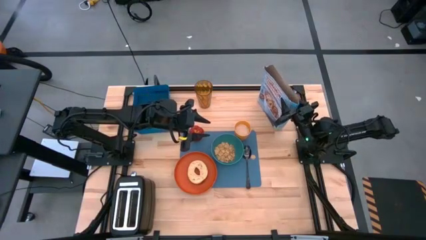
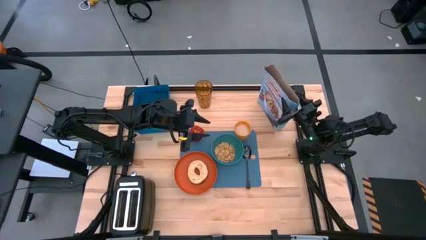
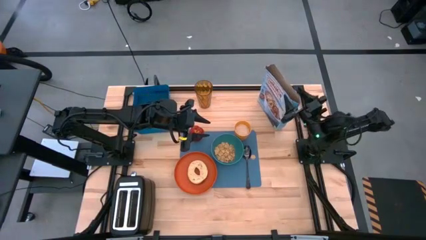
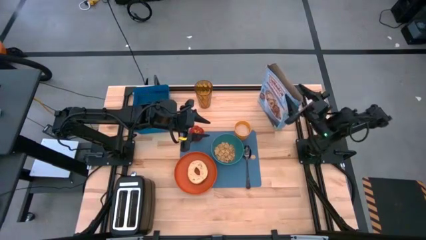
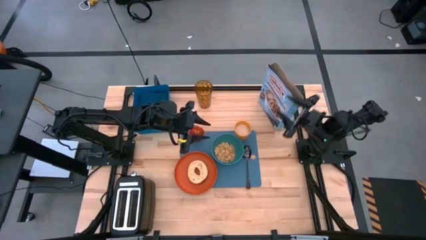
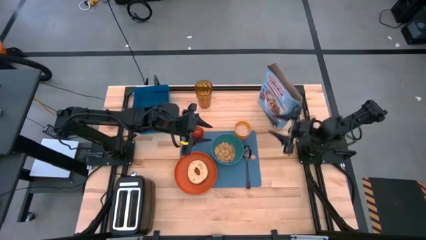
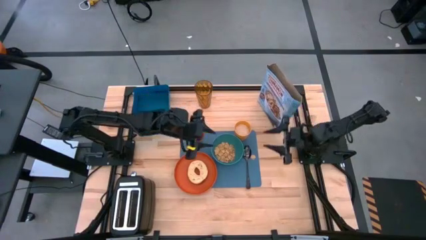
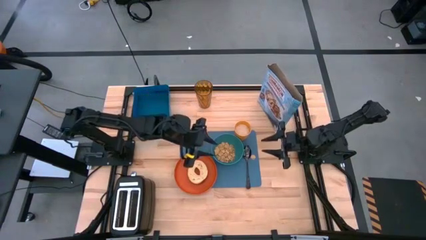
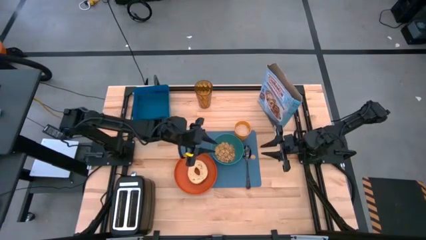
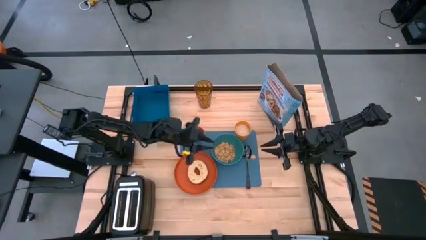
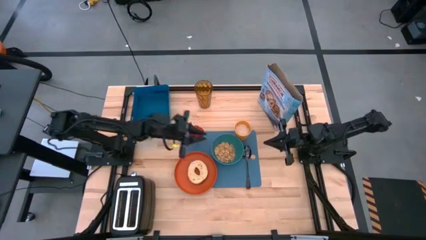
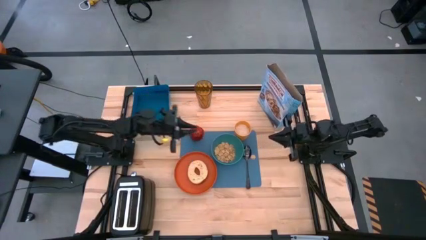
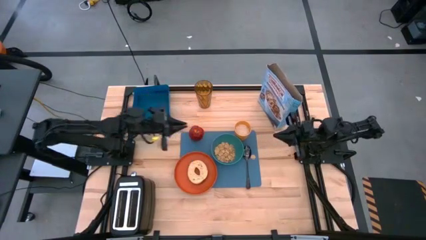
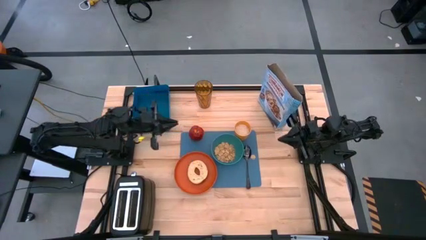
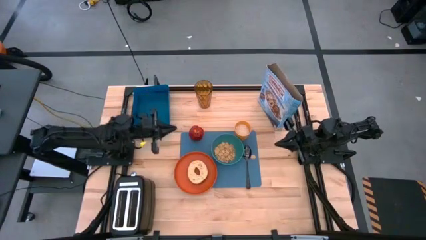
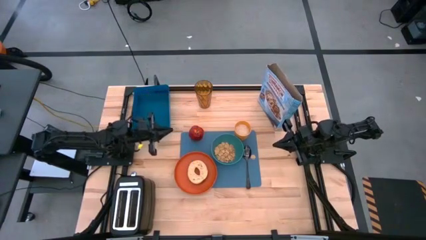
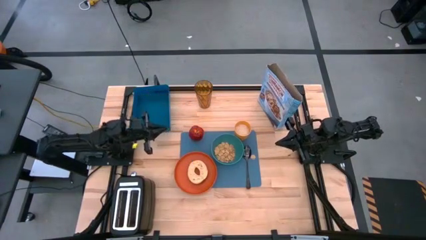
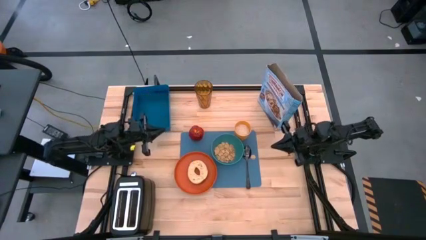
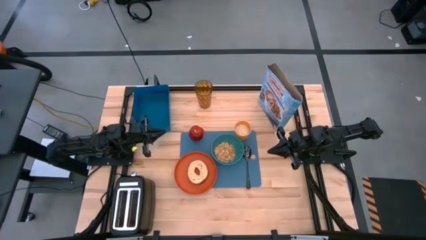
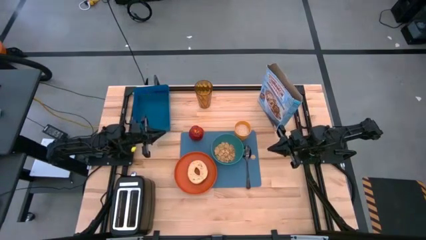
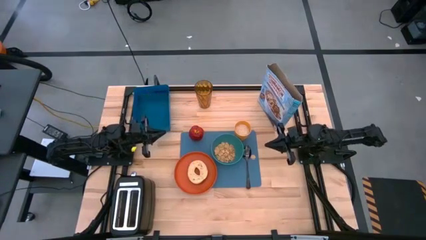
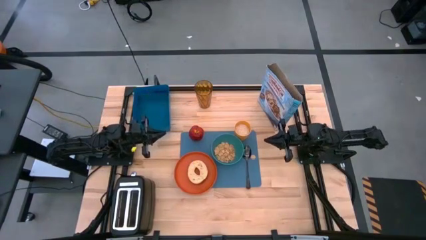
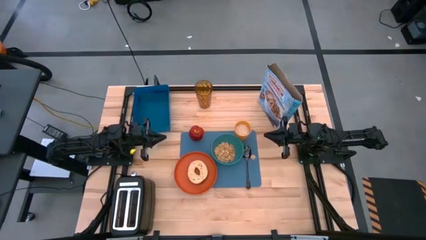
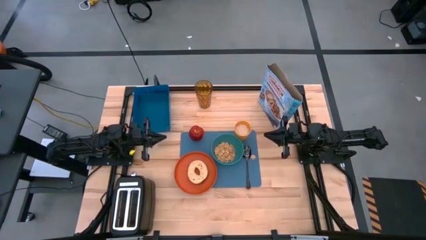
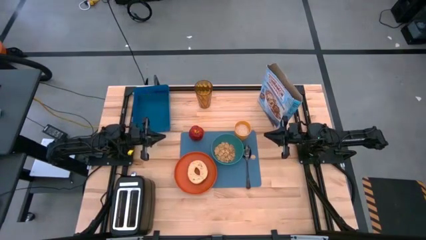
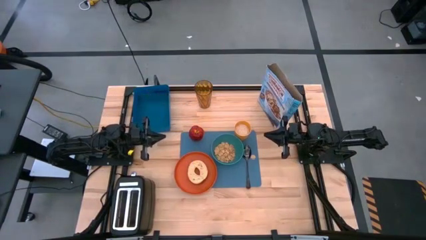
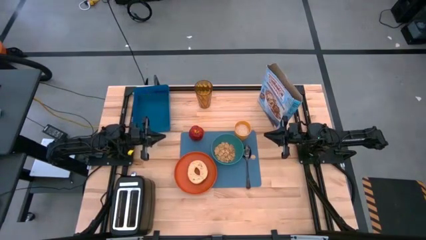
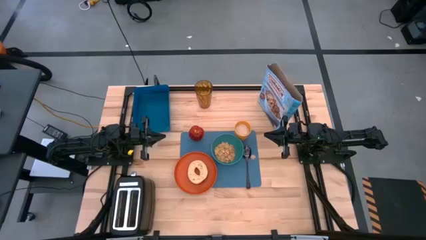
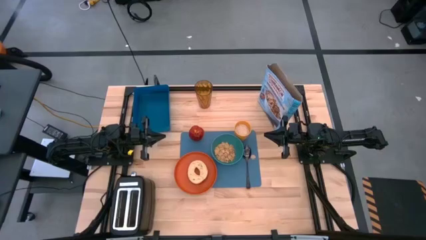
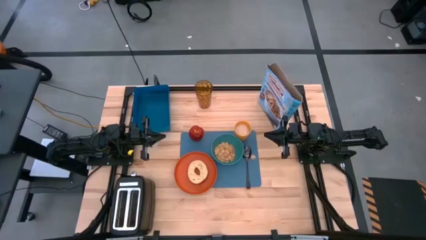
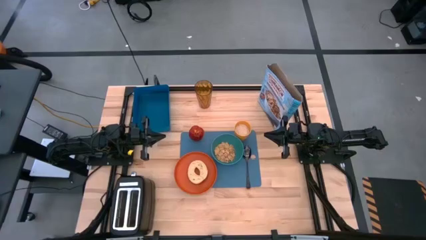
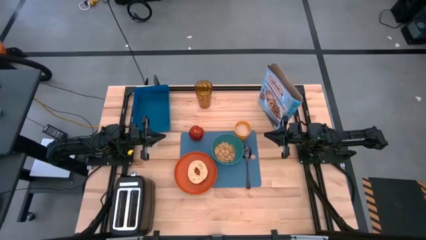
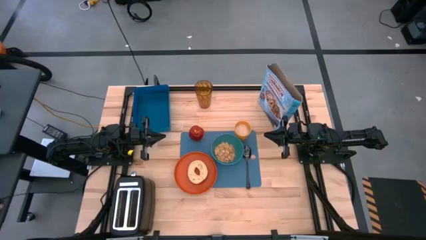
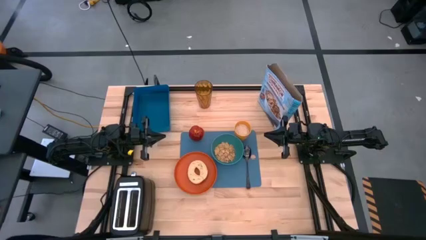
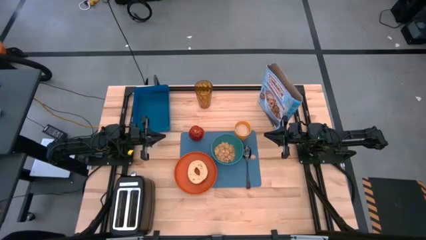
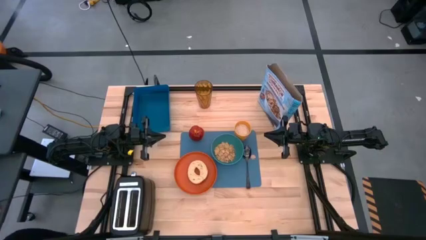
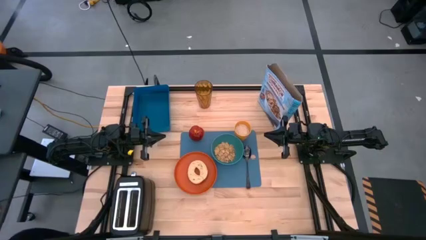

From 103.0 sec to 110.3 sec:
Task: Arrange a breakfast setting
Return to Home Position

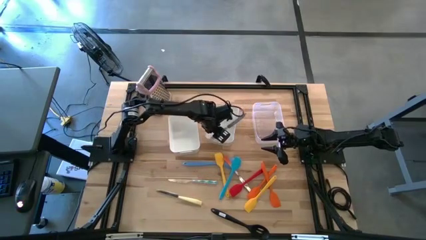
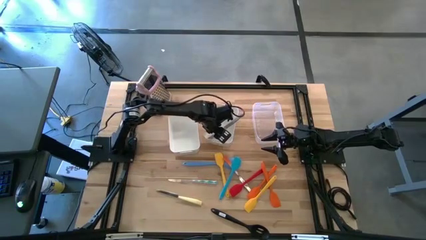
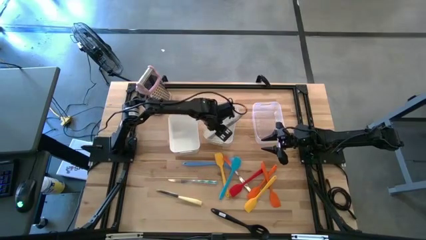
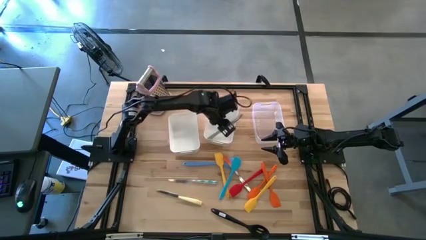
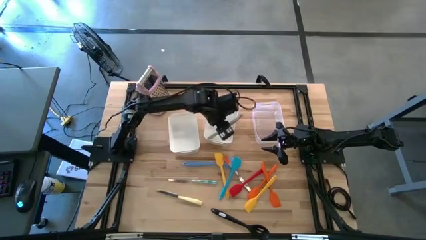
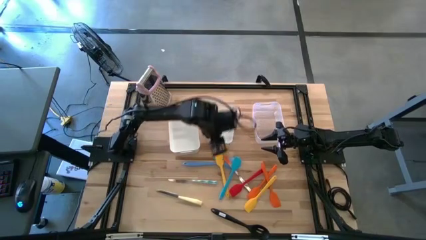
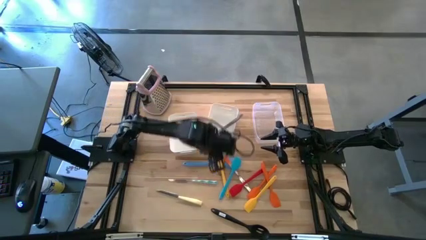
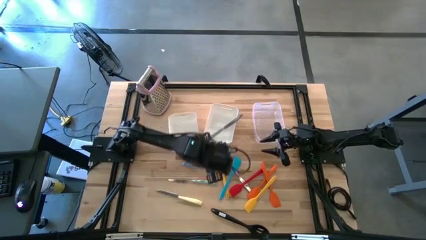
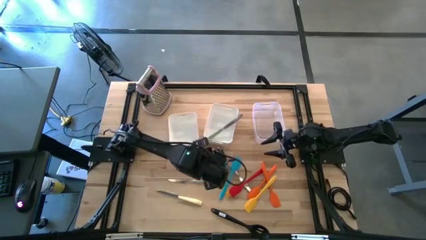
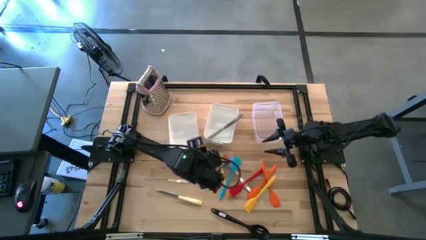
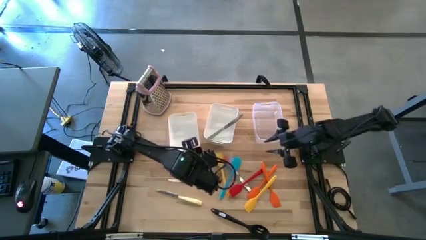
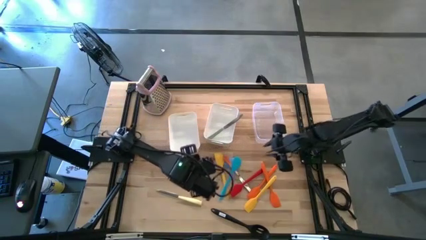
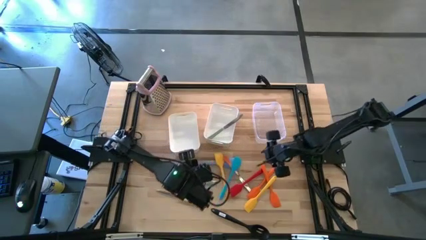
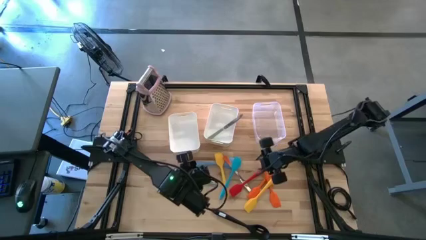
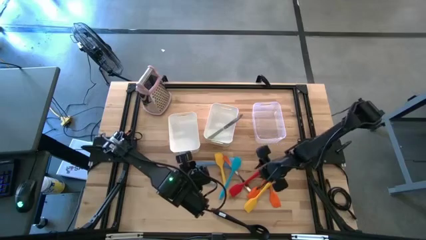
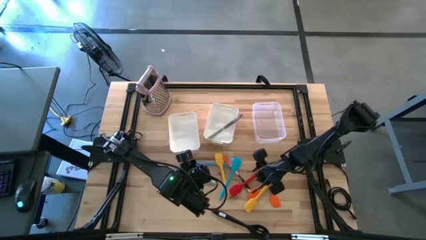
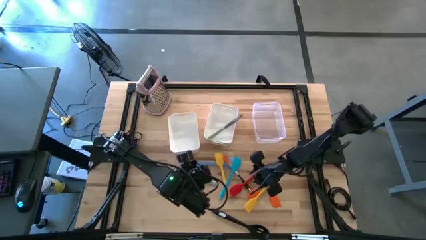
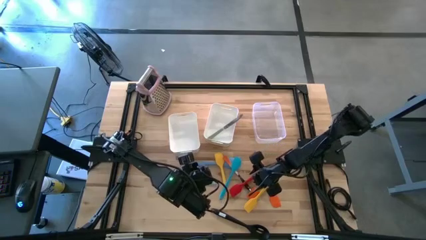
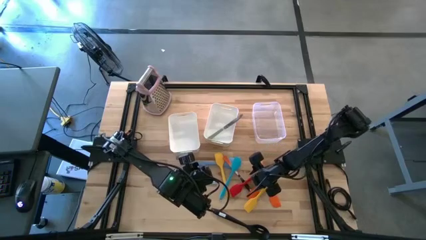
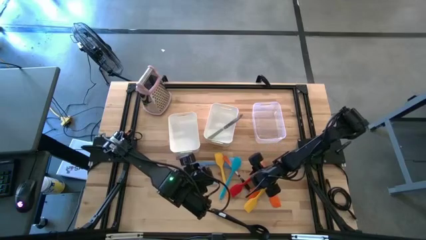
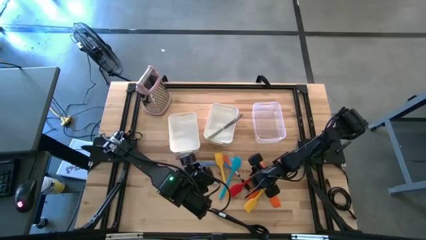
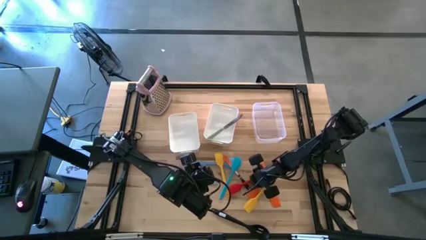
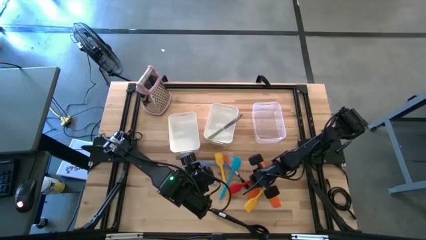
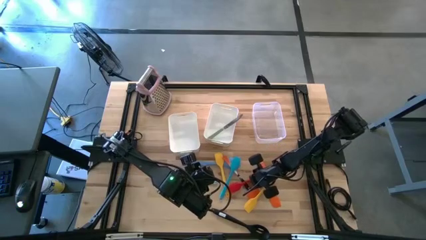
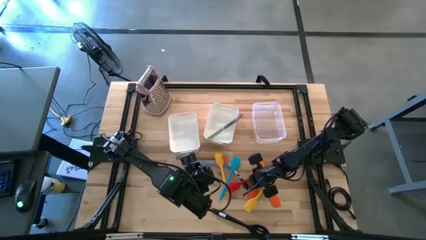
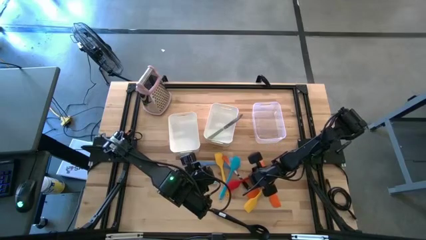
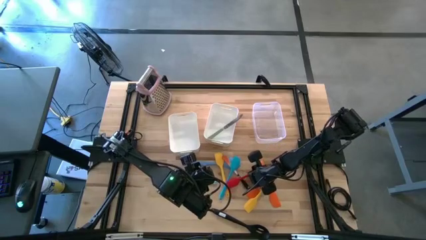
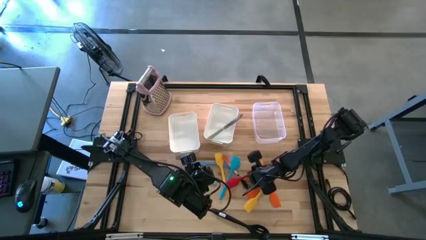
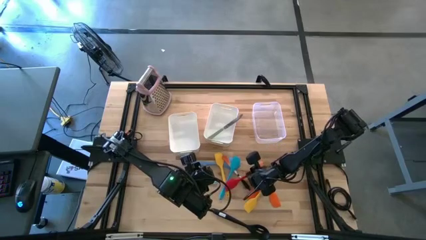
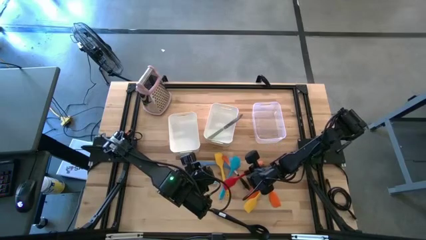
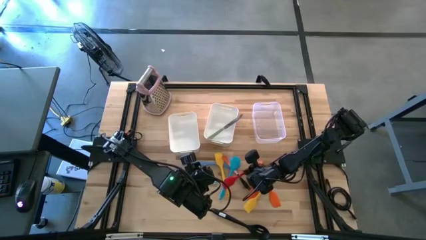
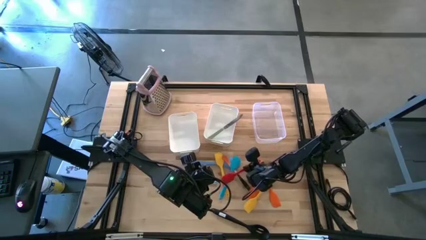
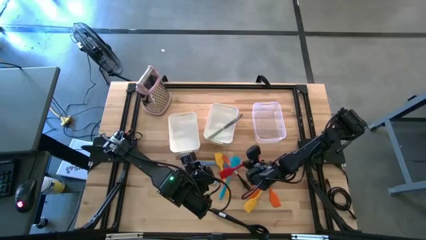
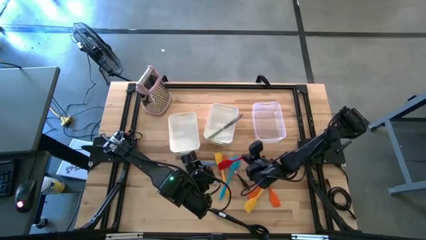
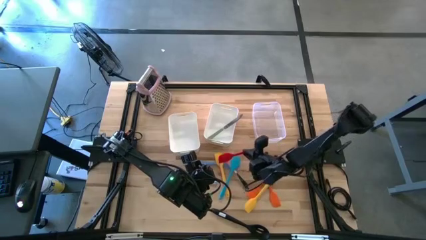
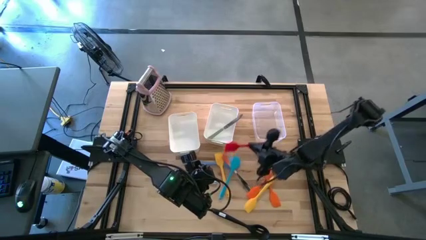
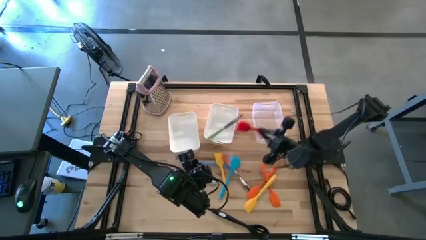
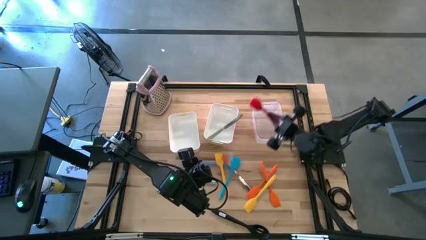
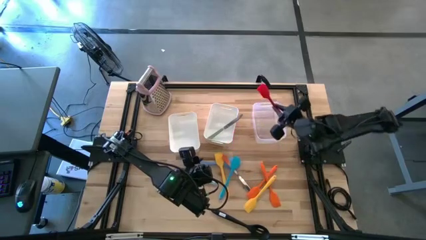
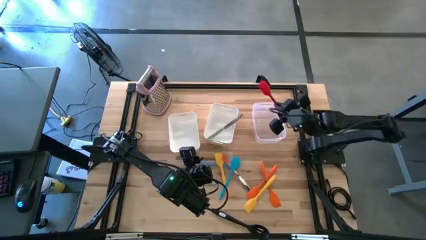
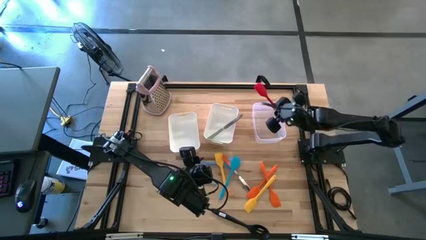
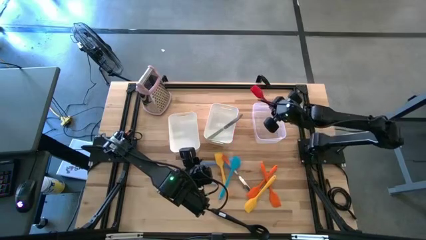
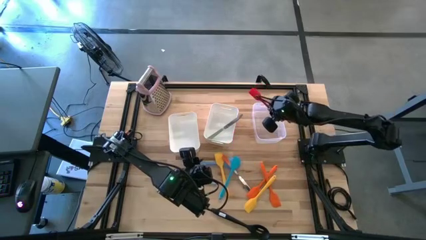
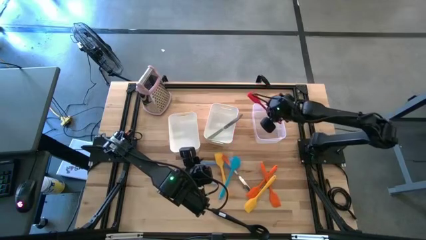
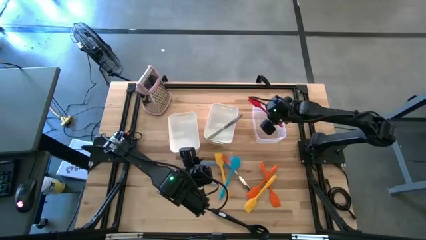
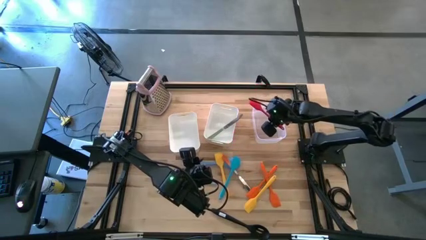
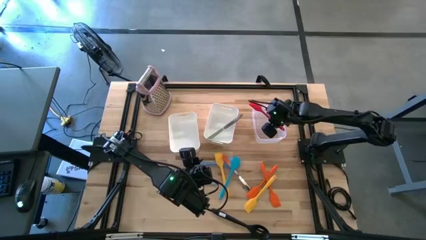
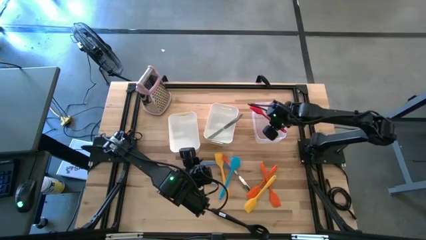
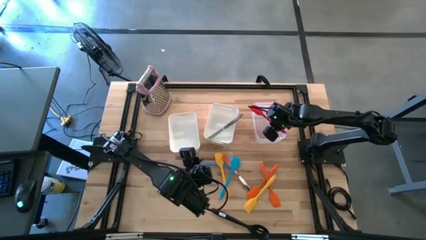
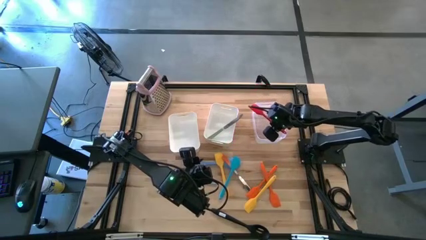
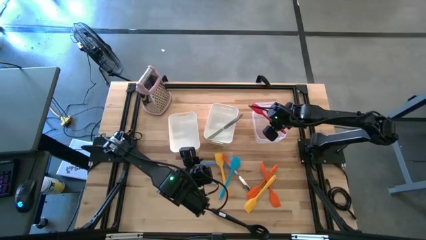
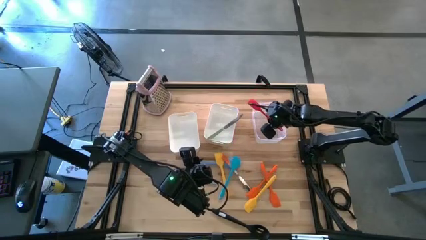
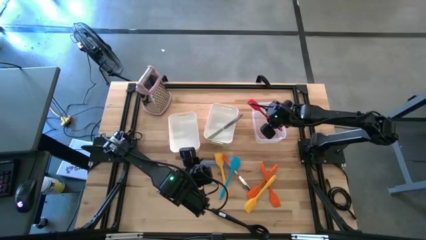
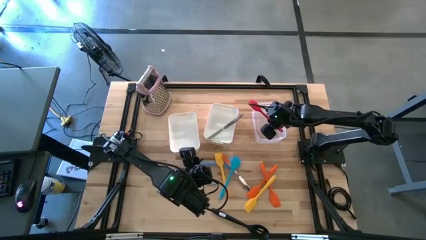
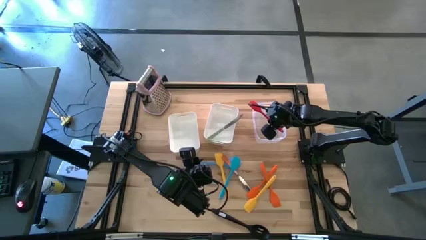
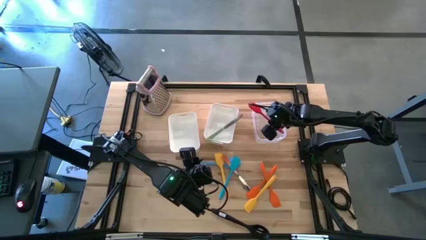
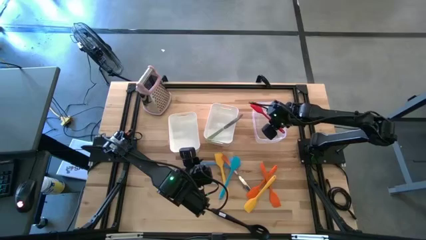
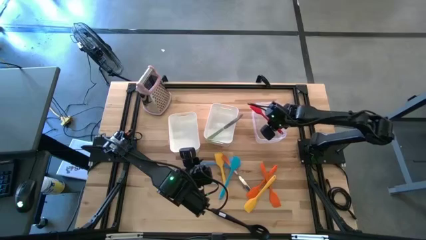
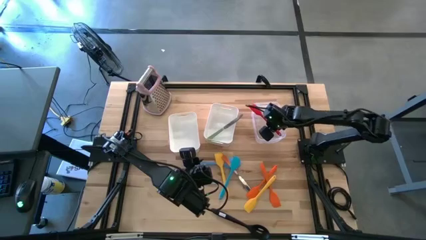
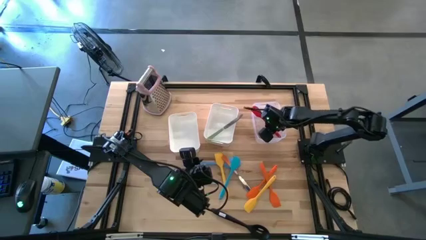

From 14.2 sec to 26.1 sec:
Task: Pick & Place Kitchen Items
Put the red spatula into the transparent bin
